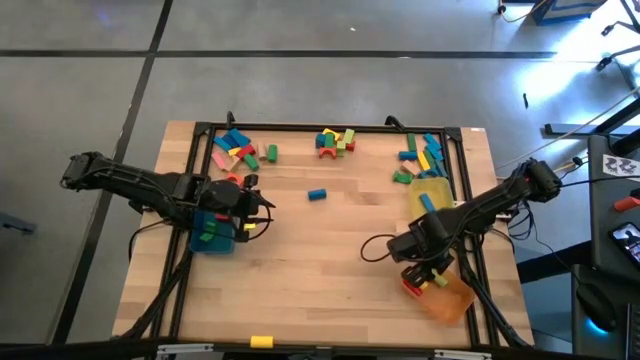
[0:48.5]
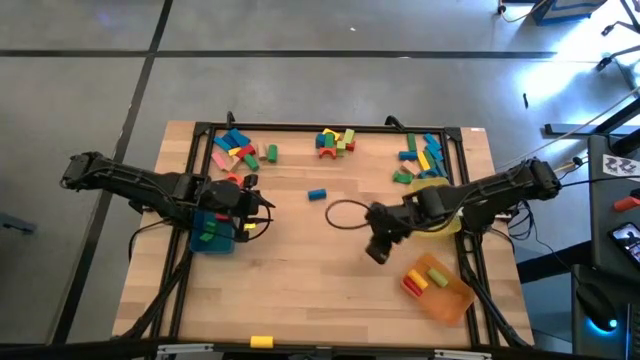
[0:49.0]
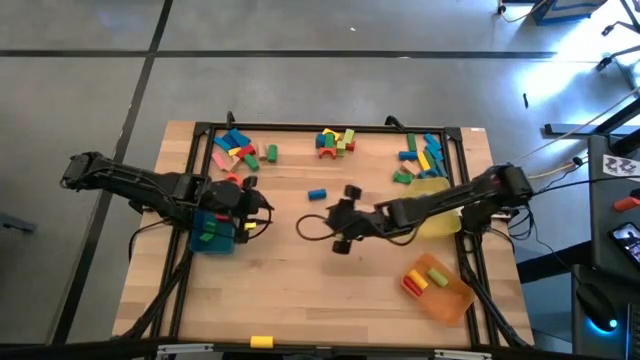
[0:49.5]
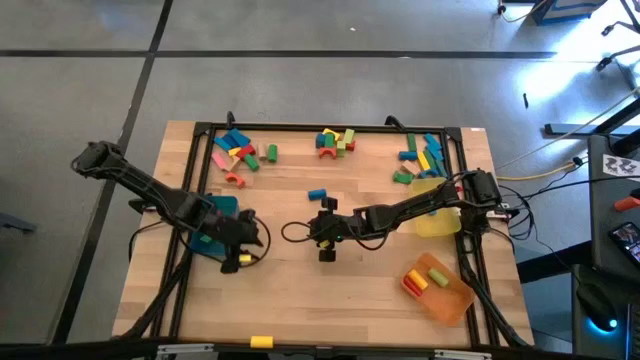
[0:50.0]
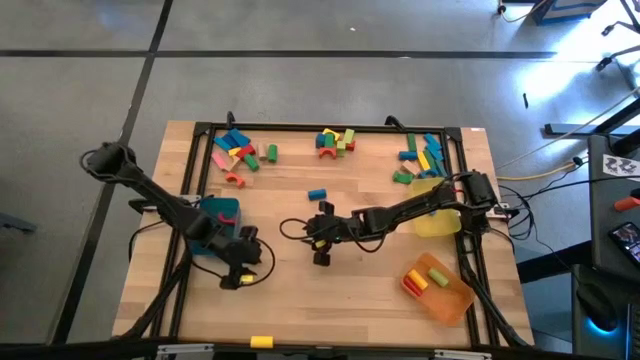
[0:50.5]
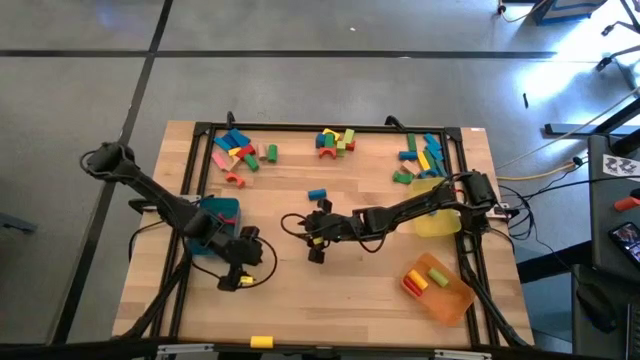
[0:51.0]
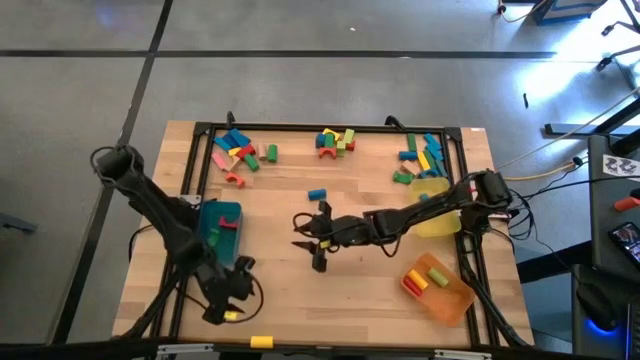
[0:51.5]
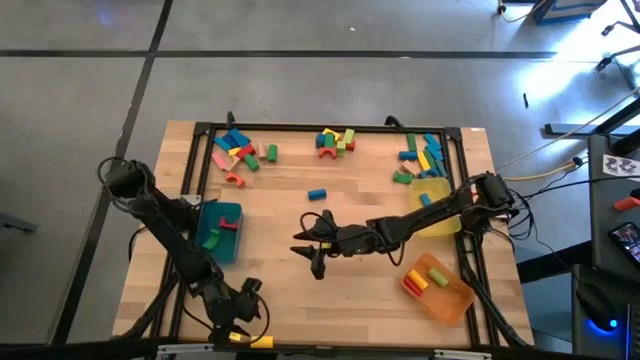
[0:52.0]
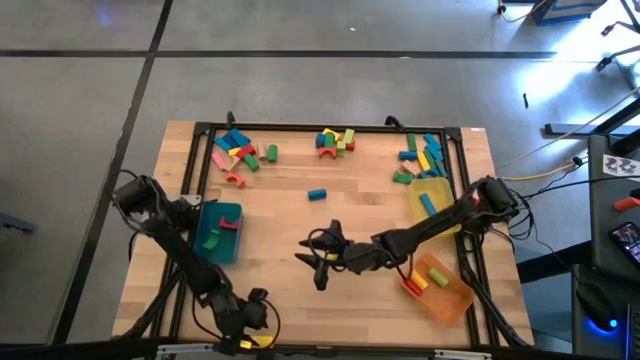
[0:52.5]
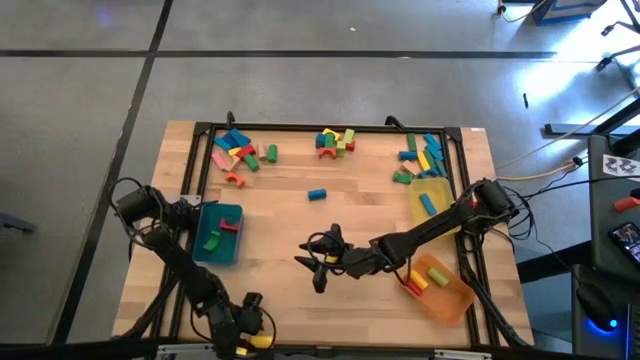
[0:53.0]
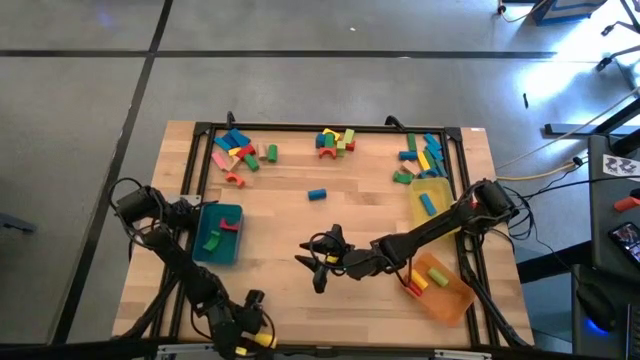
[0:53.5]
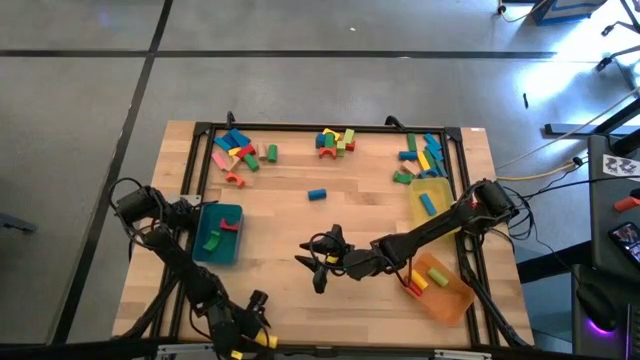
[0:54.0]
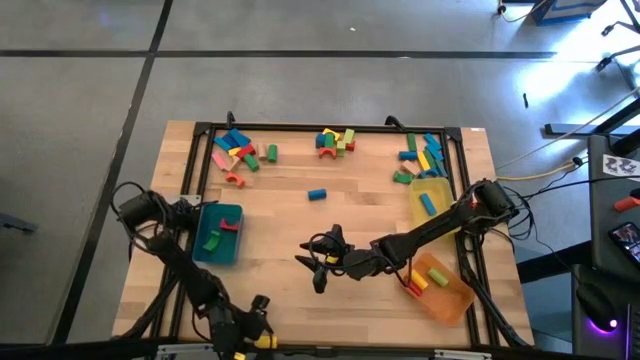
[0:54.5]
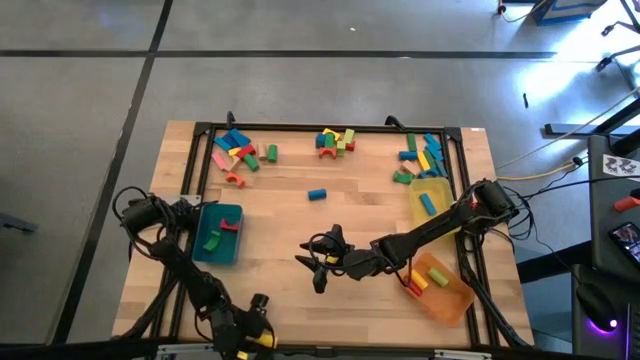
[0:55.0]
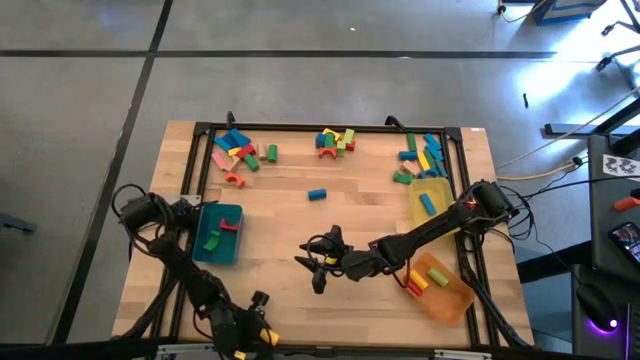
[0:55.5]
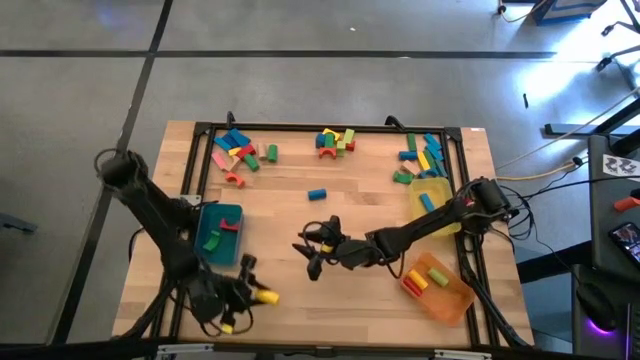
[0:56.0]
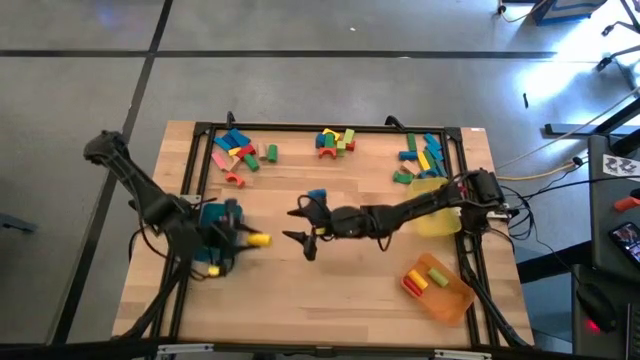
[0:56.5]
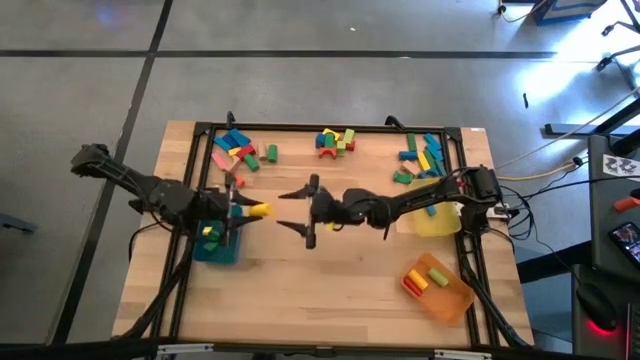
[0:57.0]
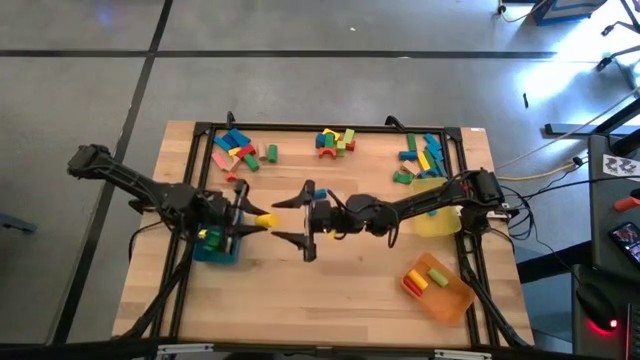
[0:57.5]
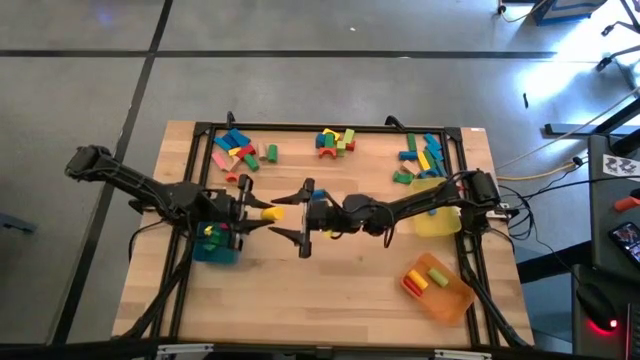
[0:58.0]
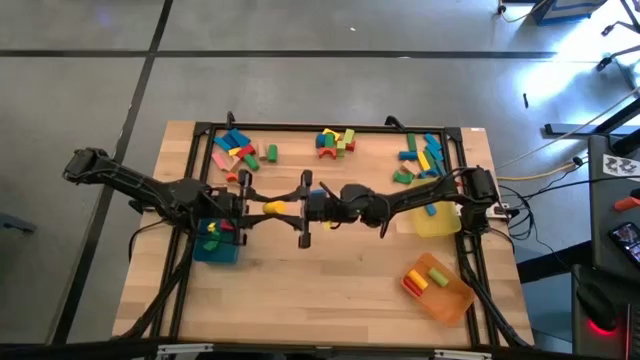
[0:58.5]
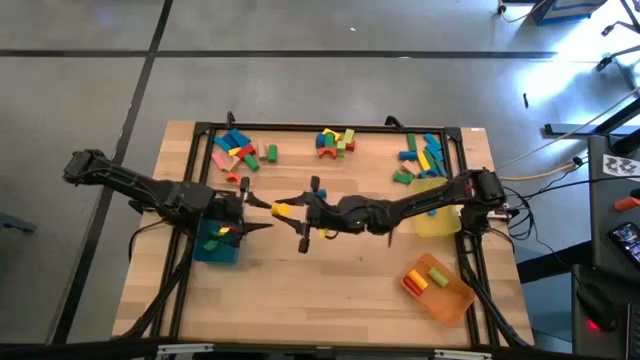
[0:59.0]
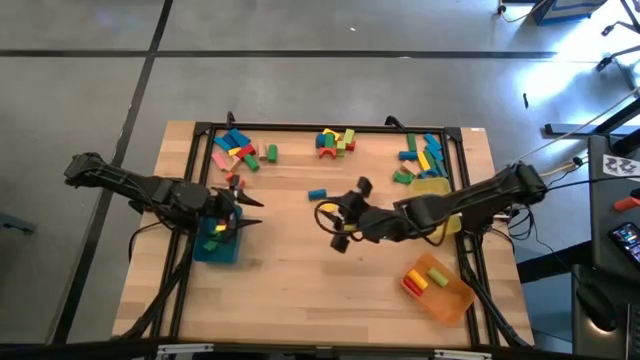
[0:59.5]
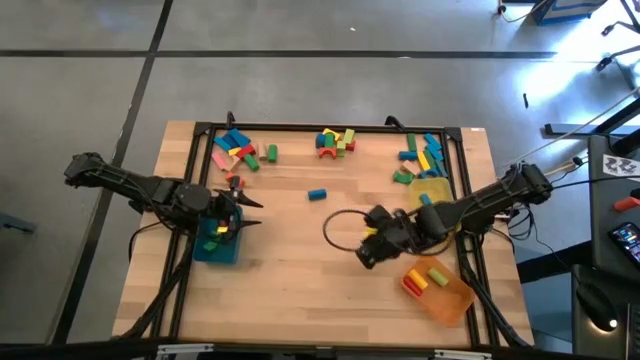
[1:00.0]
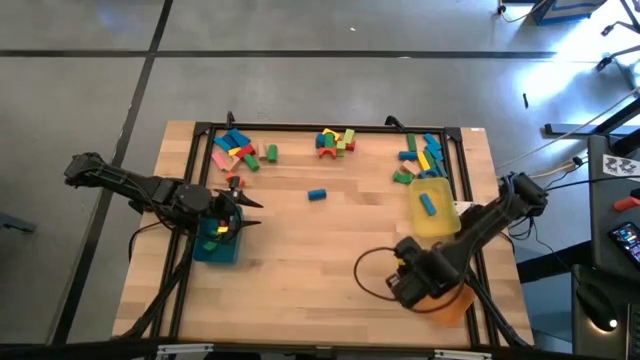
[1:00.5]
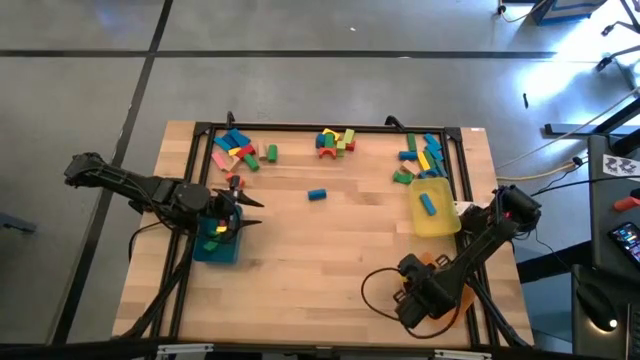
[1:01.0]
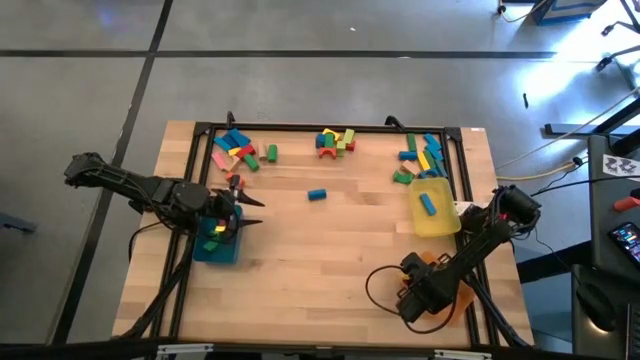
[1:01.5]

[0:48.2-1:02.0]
Task: Sort blocks by size
Put the yellow cylindrical block into the orange bin

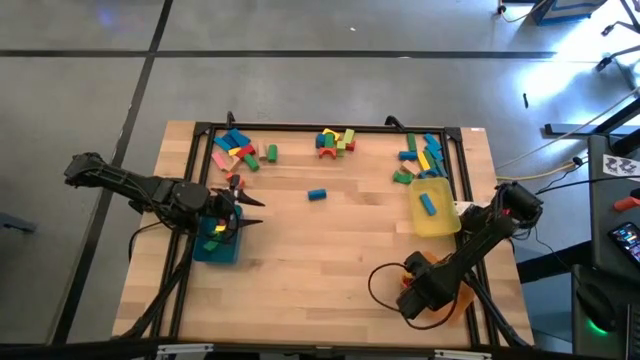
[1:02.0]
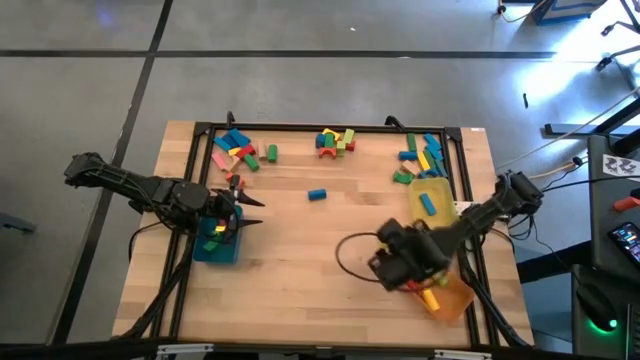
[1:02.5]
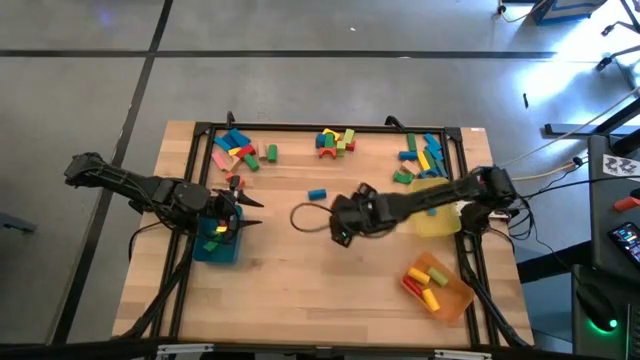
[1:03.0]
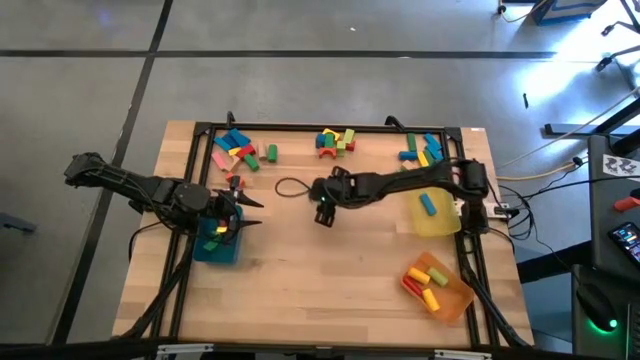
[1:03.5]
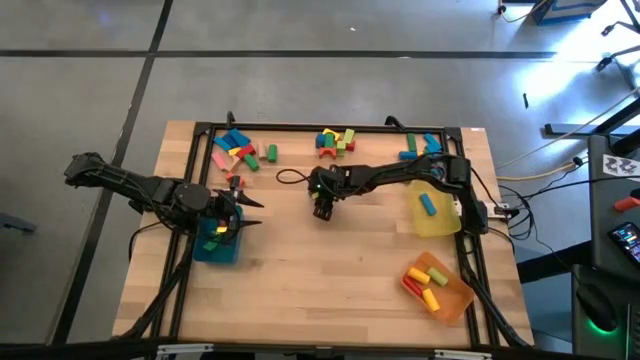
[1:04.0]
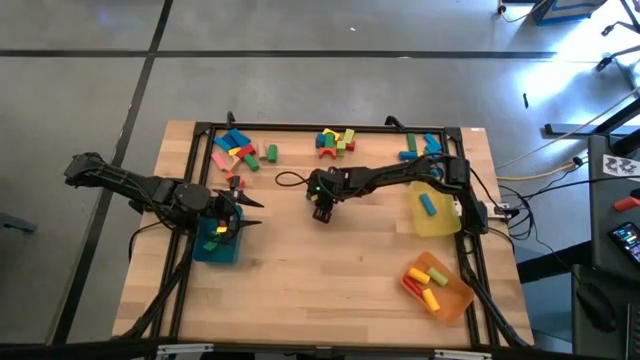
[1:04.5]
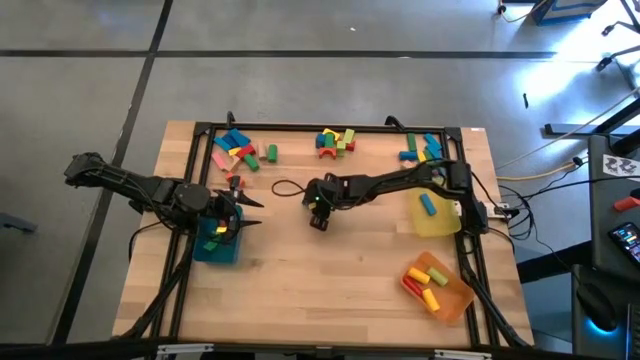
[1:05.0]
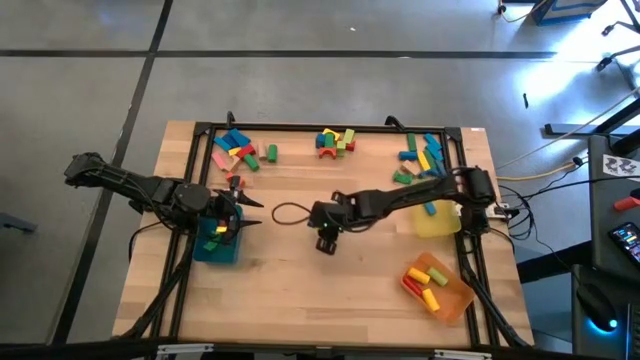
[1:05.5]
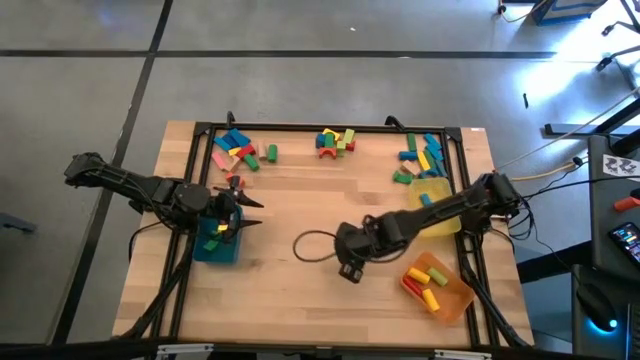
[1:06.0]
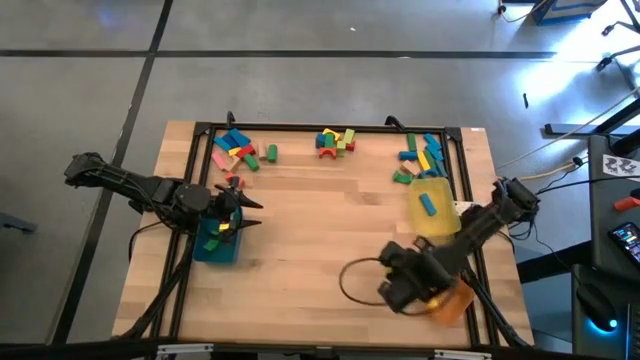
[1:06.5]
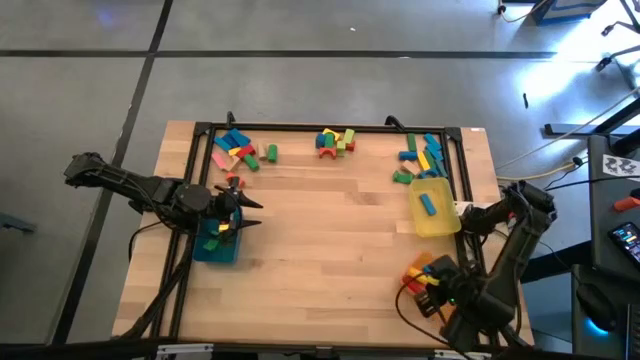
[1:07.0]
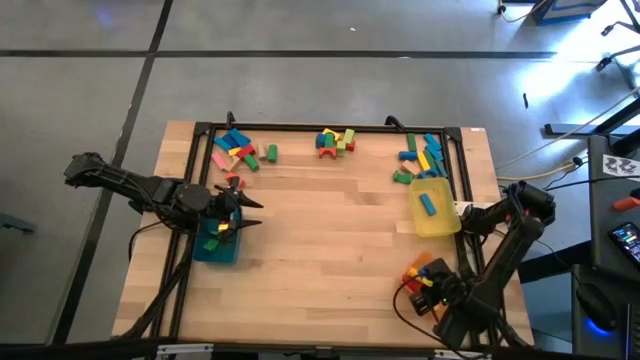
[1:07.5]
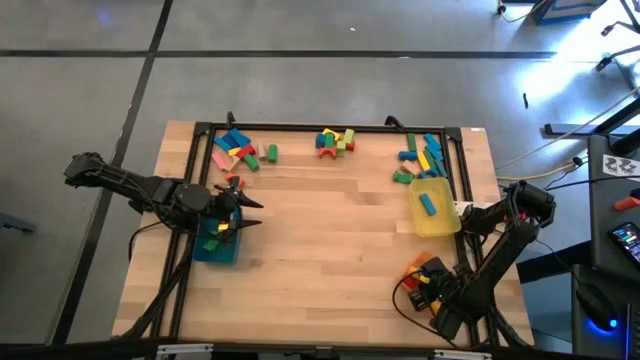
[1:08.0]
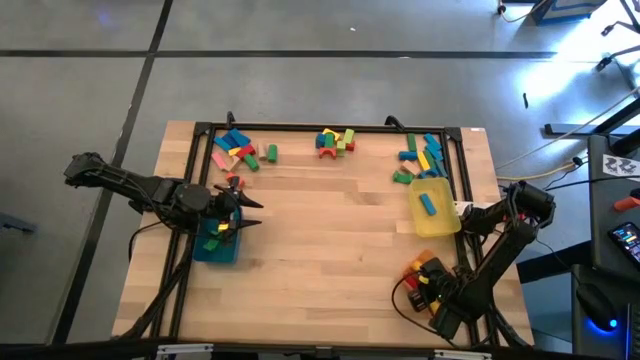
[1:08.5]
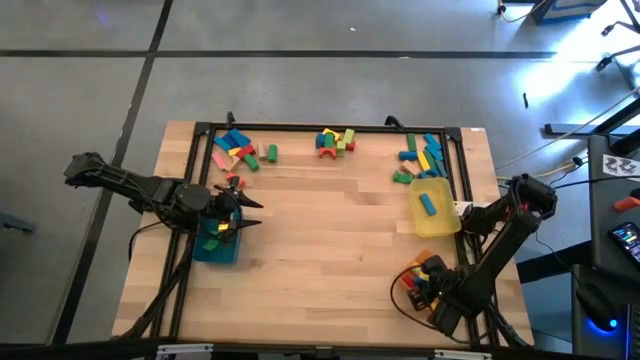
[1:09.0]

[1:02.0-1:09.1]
Put the blue cylindrical block into the orange bin

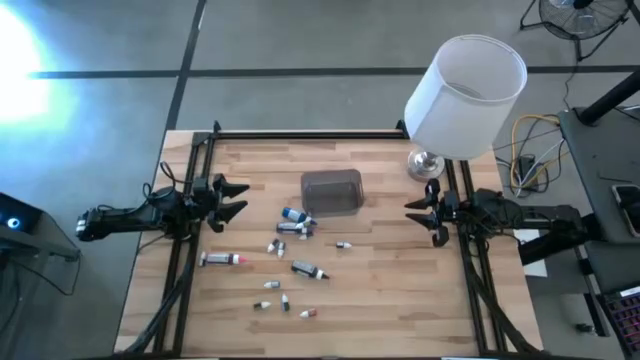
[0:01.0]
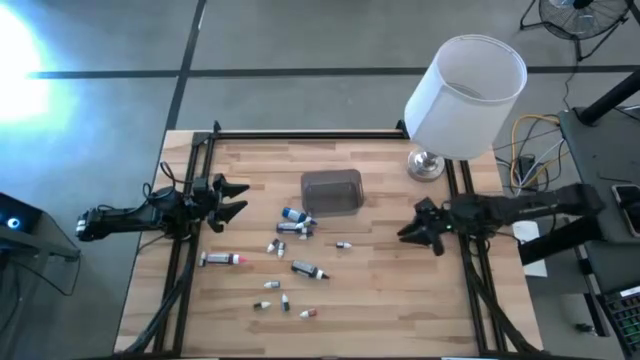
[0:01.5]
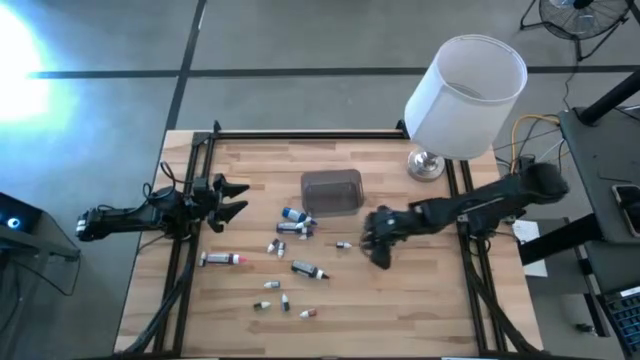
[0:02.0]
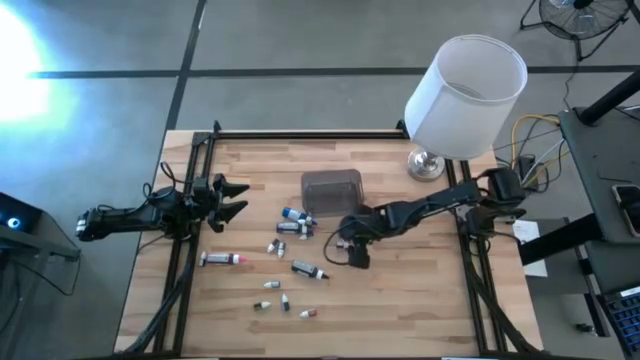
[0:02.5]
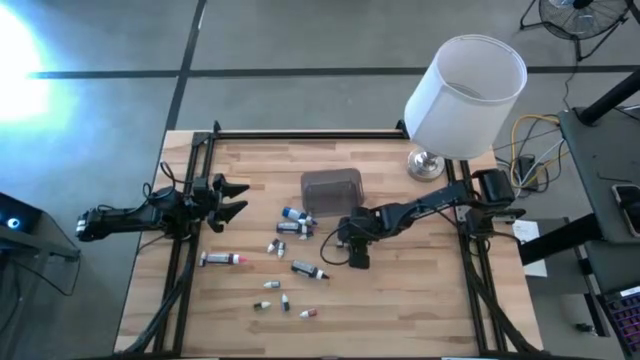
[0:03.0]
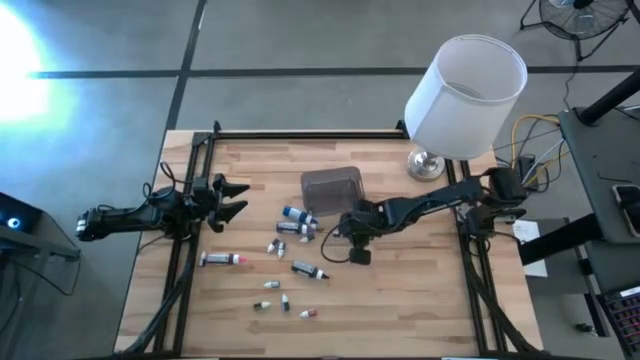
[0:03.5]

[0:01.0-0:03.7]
Task: Pick & Place food coloring
Put the small red food coloring bottle into the bin
